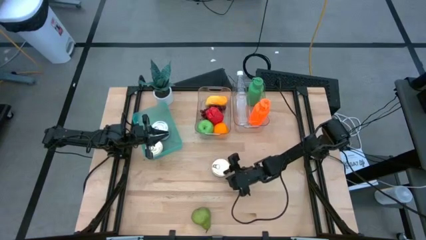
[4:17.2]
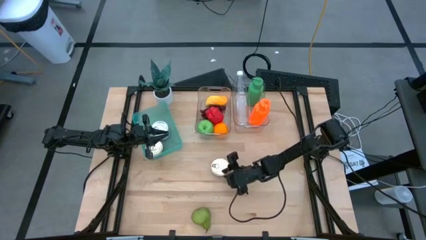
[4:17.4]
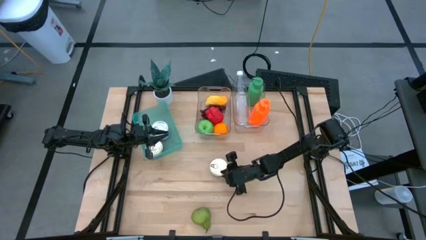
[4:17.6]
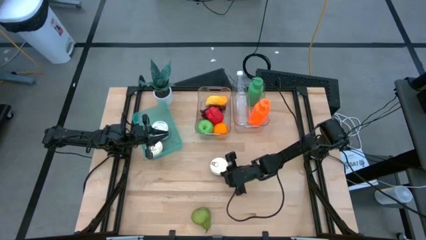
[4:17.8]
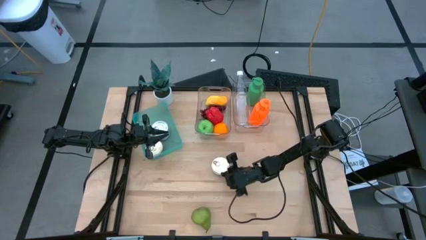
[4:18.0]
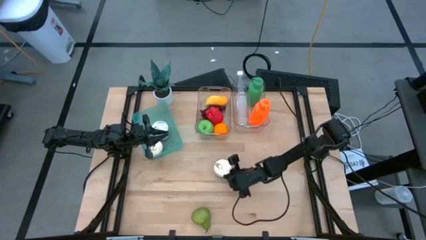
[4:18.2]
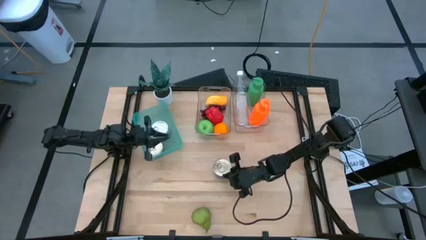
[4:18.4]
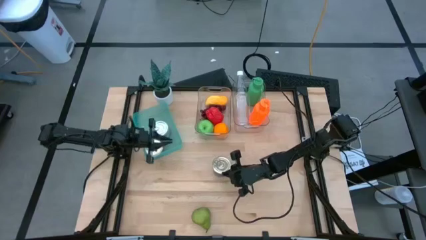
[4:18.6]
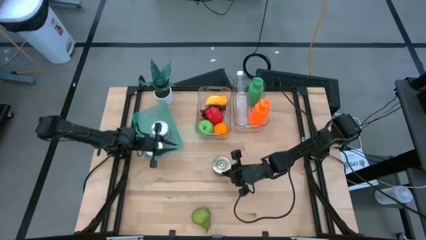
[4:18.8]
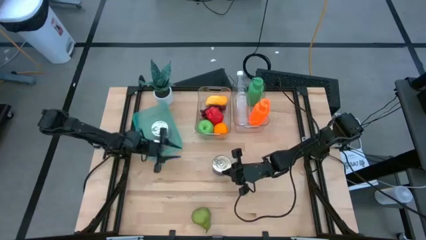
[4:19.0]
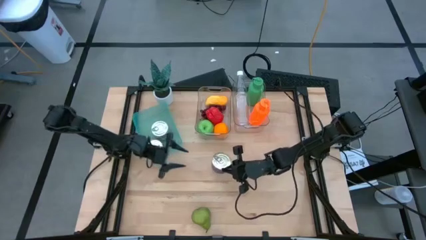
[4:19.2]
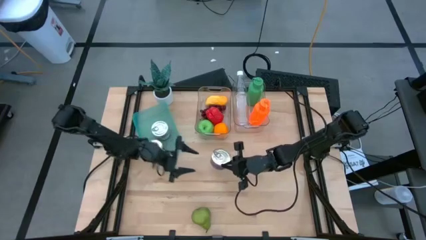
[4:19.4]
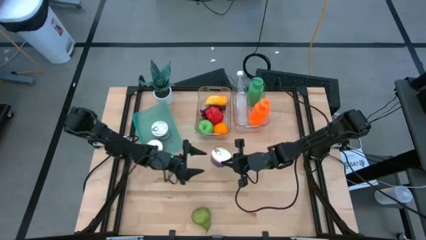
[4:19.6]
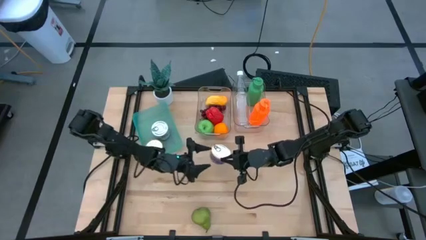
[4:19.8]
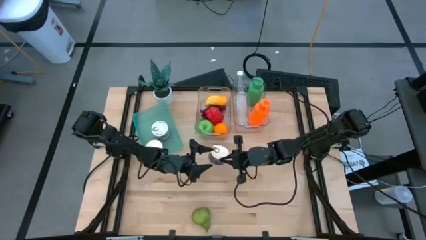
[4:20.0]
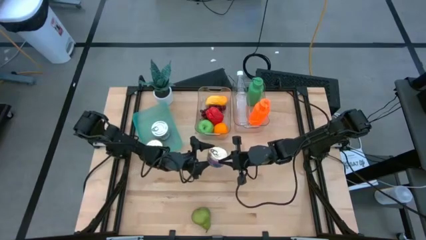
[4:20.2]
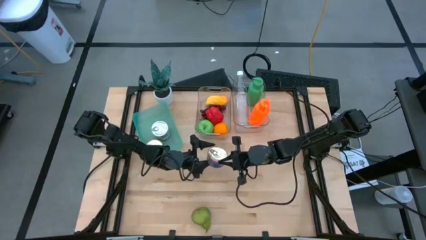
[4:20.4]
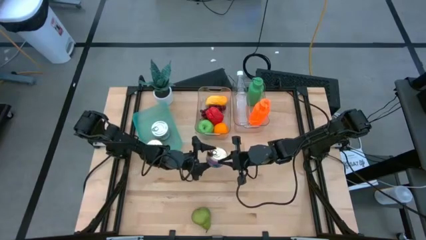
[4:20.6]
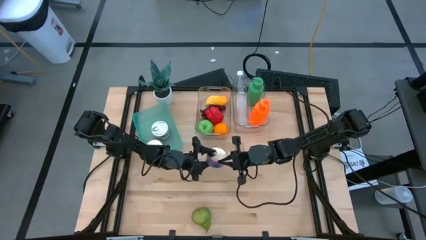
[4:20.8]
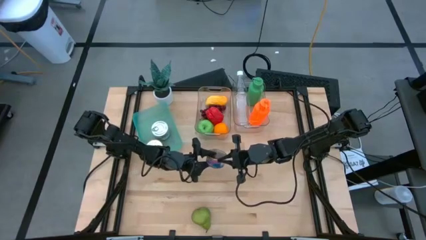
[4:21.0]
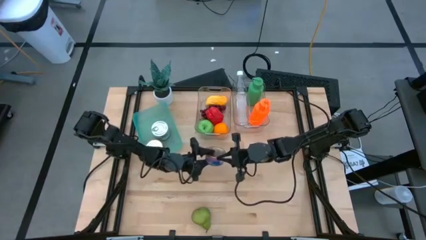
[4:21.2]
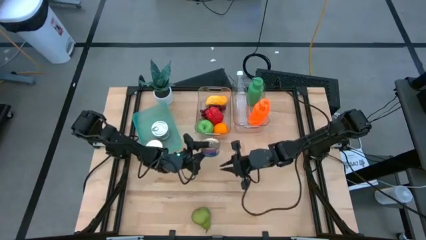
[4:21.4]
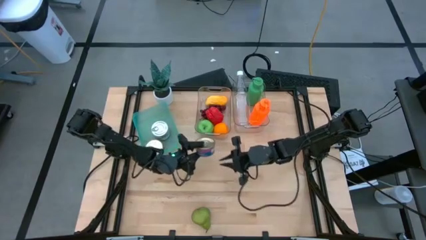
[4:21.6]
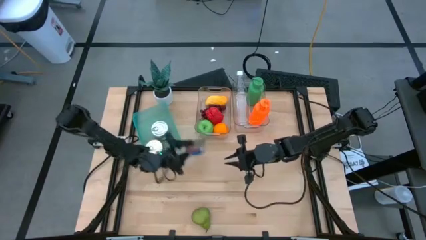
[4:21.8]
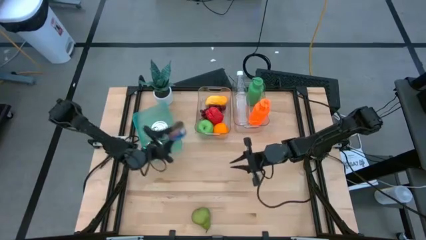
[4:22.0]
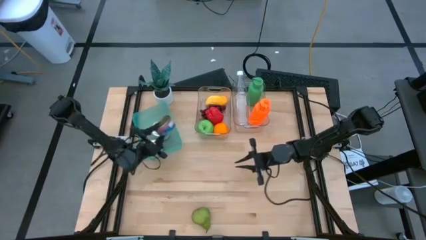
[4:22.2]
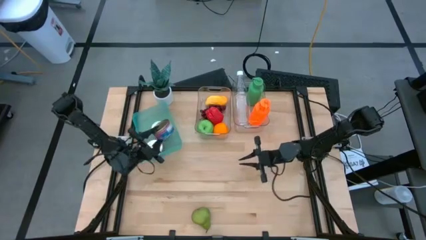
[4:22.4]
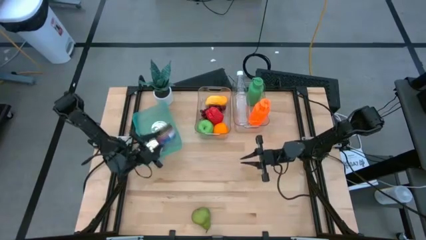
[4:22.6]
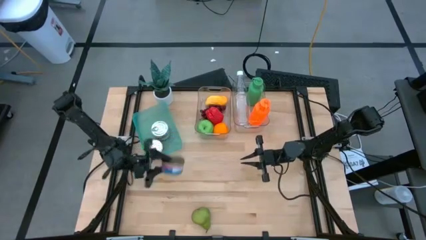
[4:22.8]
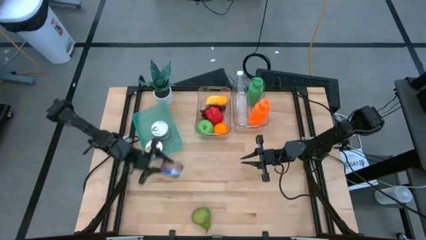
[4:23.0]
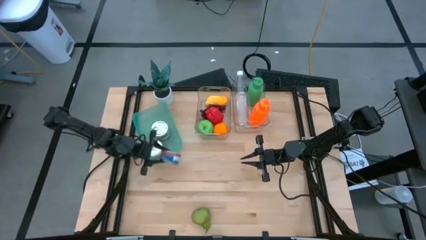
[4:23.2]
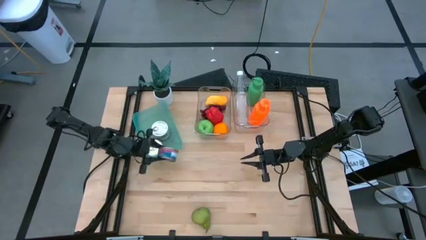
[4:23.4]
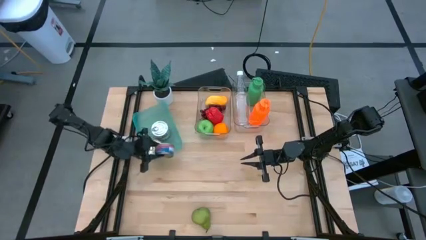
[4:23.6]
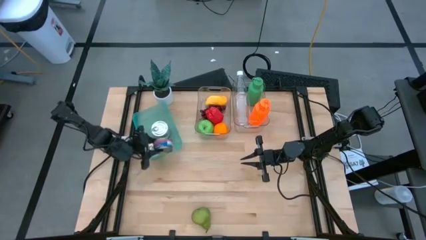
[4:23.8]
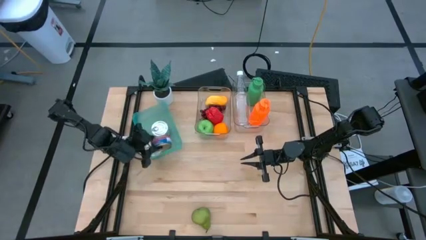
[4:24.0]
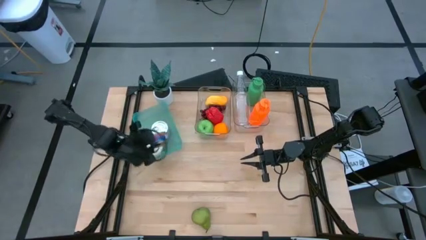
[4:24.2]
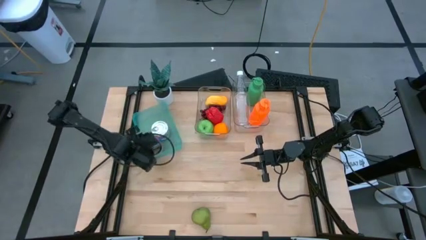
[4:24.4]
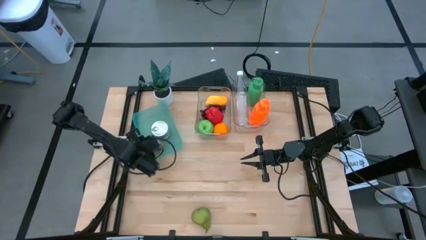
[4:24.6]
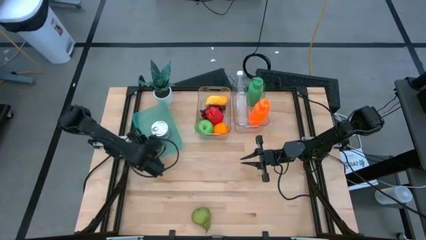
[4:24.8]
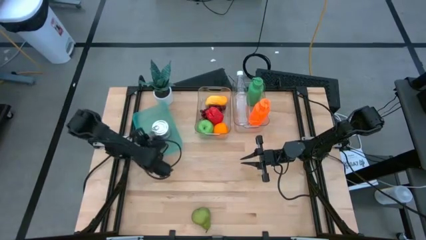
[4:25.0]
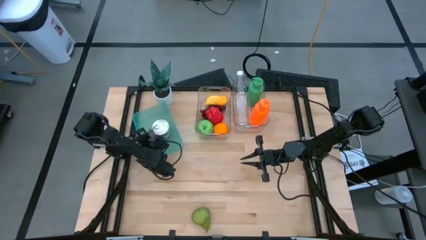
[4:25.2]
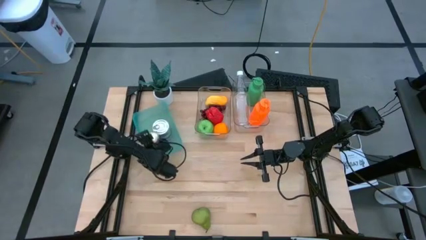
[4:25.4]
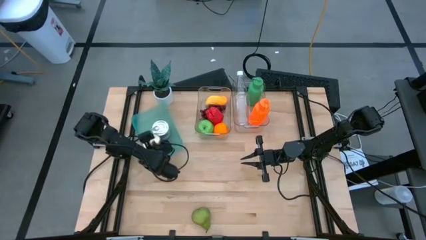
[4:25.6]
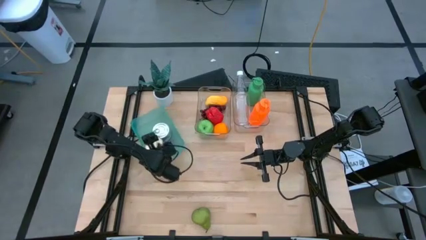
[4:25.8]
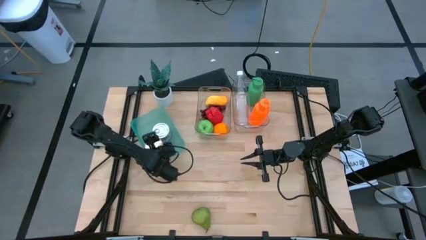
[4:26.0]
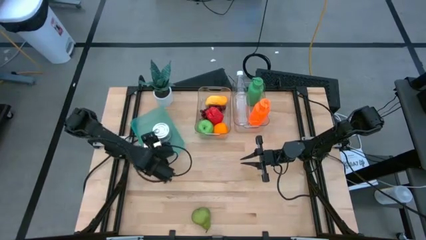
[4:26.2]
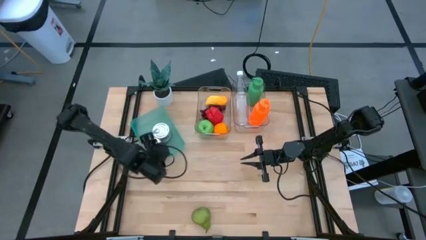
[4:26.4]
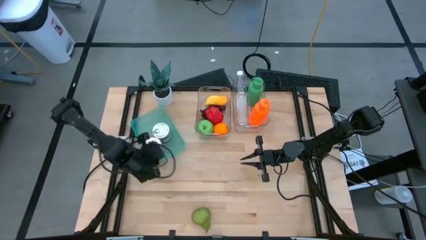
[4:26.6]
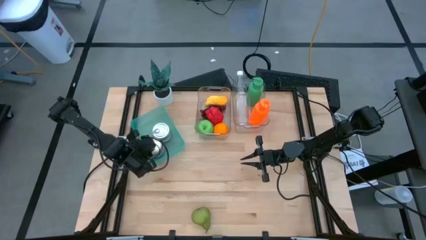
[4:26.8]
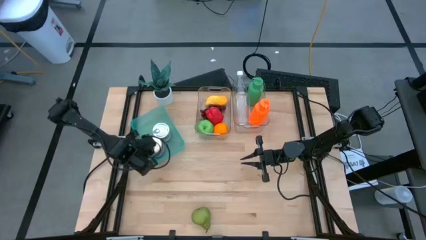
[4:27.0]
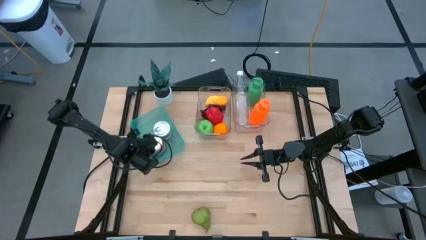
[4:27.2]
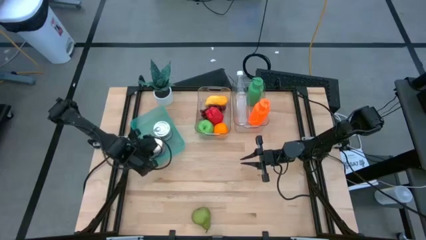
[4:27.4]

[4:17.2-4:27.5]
Task: Pick & Place Food Item
Stack the blue and pink tuna can on top of the blue and pink tuna can in the bin

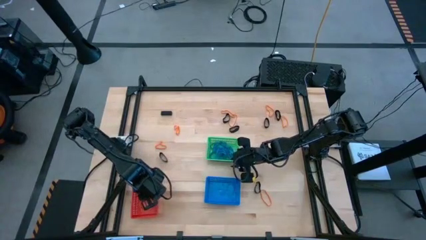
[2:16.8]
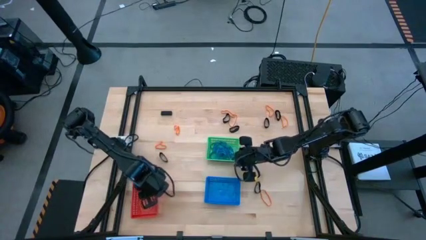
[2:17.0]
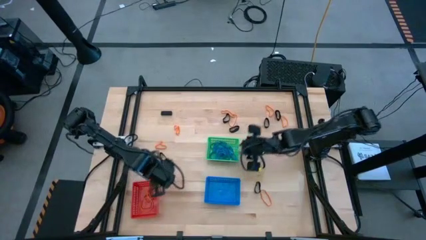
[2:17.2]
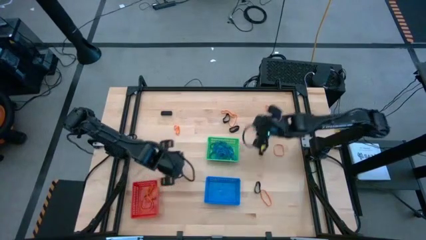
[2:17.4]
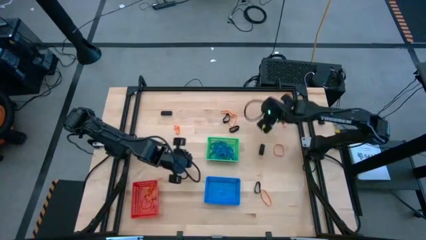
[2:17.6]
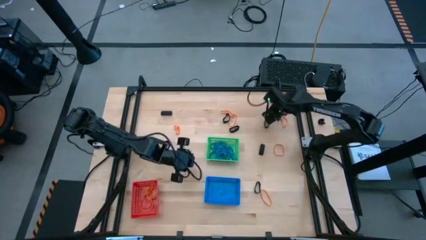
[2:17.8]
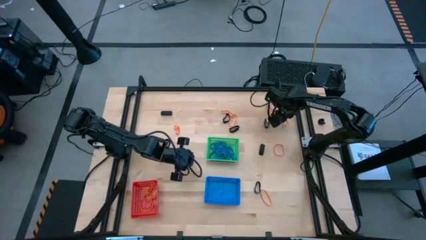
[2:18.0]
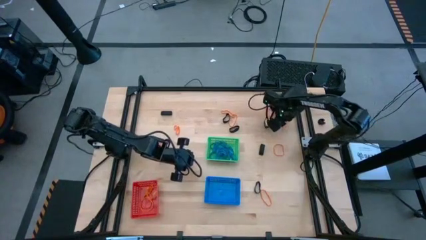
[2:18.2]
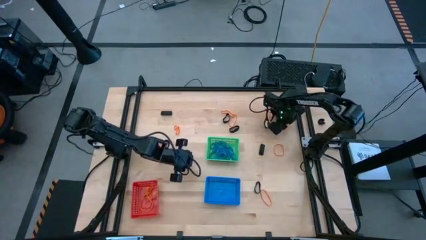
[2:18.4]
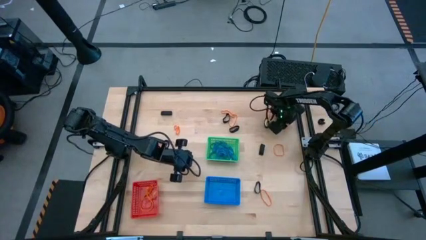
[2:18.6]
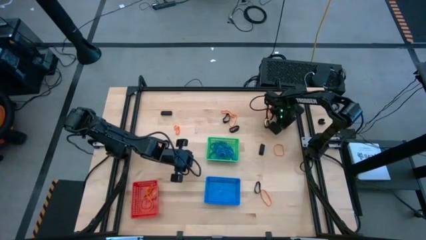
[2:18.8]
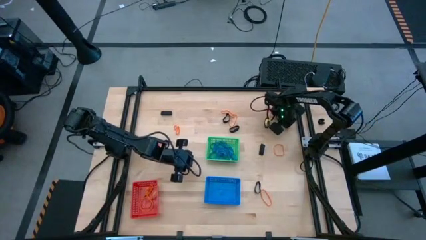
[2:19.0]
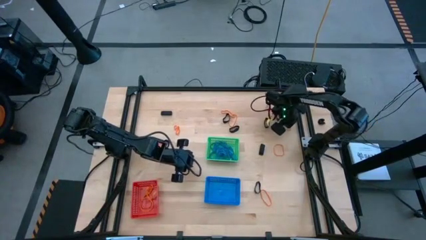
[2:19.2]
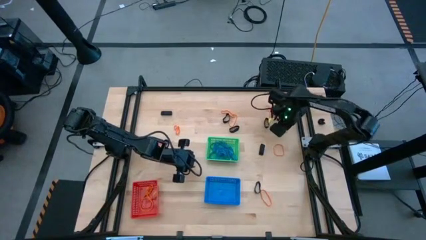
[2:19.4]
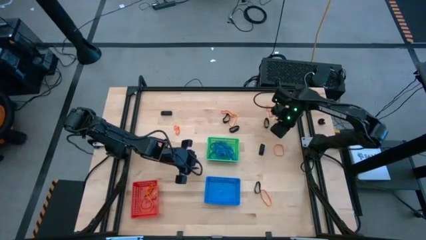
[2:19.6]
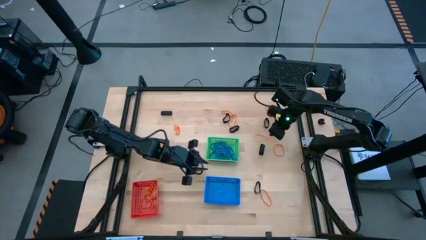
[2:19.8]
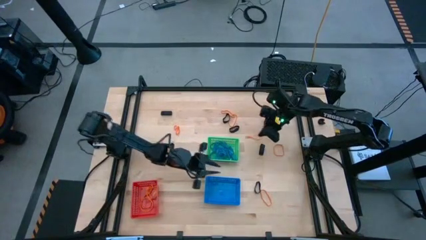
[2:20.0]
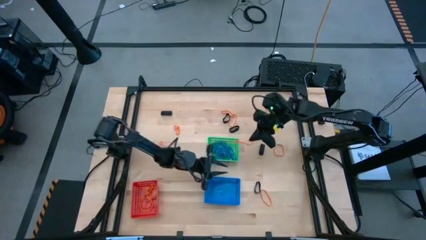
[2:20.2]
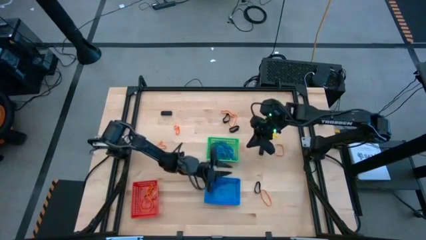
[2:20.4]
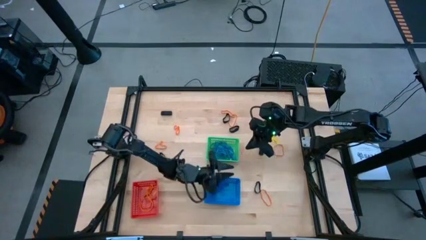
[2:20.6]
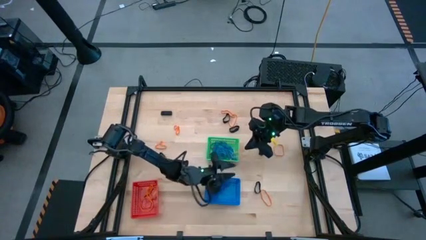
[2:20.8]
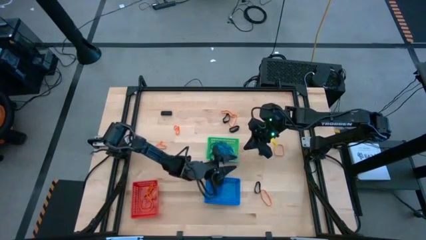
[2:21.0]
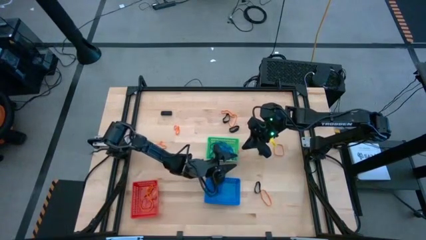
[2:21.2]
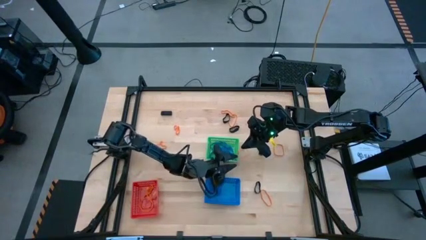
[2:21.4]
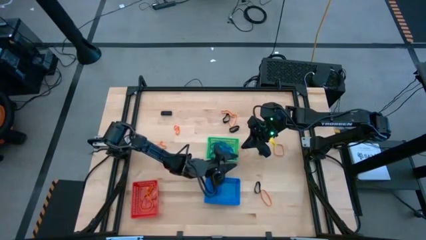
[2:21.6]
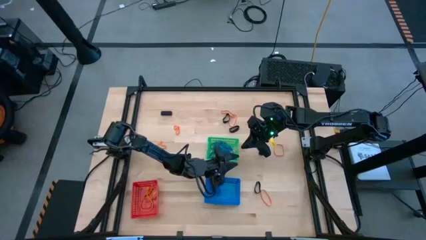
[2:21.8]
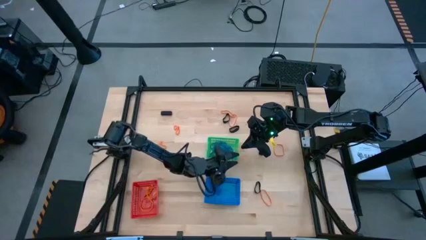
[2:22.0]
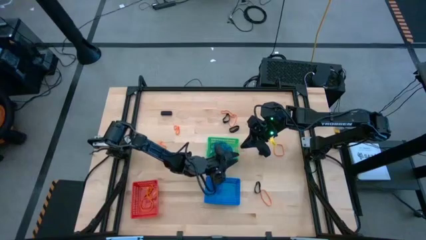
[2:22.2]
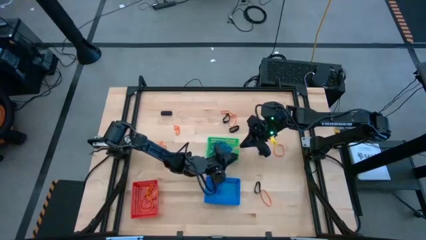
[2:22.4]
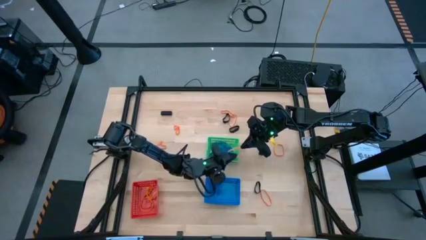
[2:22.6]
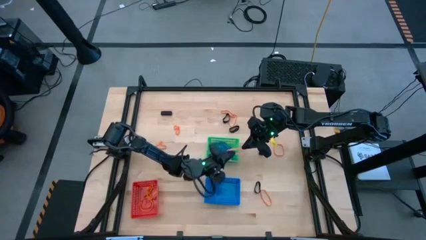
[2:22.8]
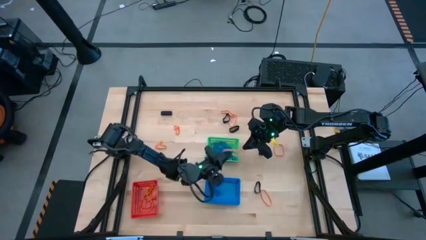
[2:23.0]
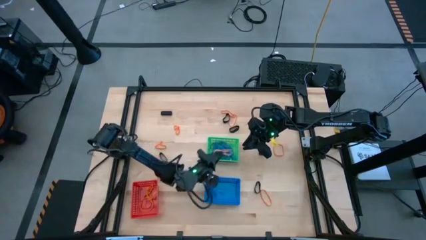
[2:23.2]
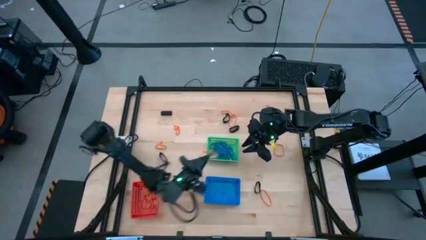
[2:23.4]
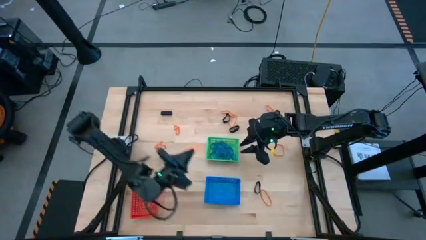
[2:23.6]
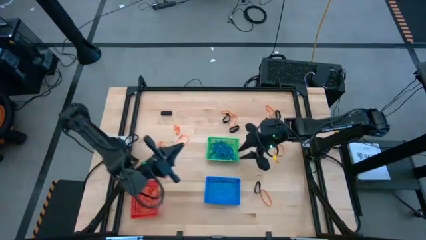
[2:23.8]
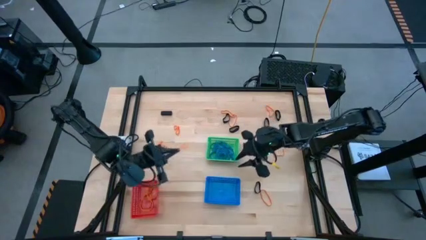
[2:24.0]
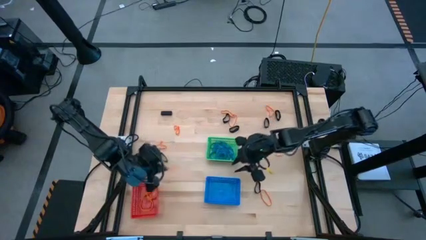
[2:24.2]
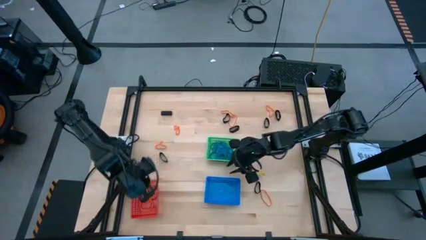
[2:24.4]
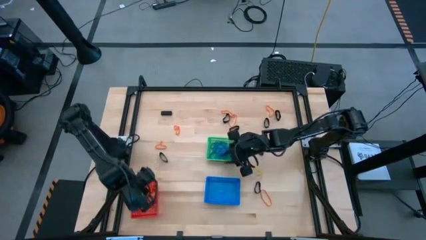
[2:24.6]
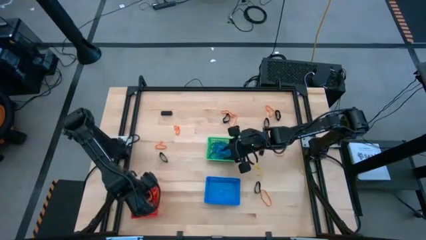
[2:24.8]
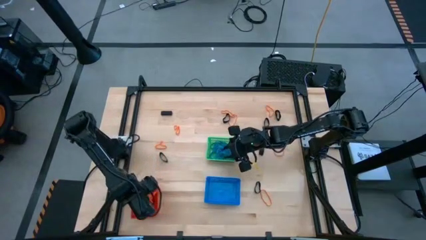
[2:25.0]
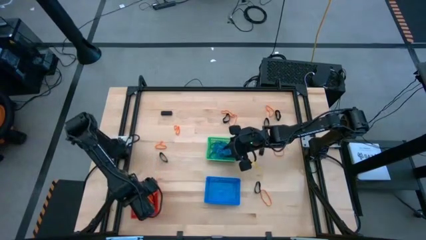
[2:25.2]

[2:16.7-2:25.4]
Task: Sort rubber bands into baskets
Put the orange rubberband into the red bin
